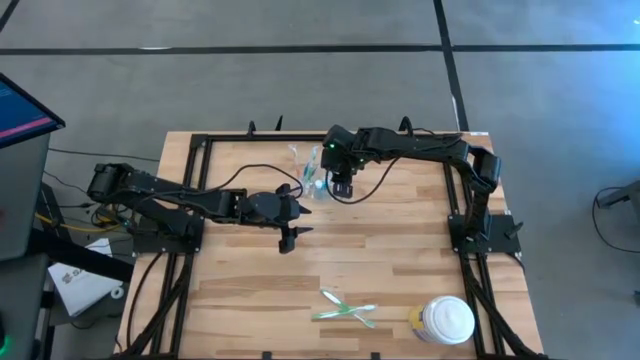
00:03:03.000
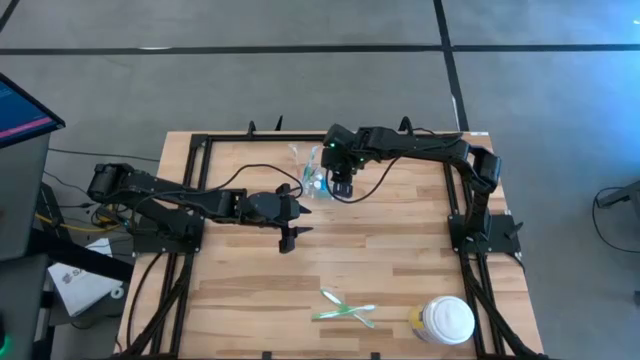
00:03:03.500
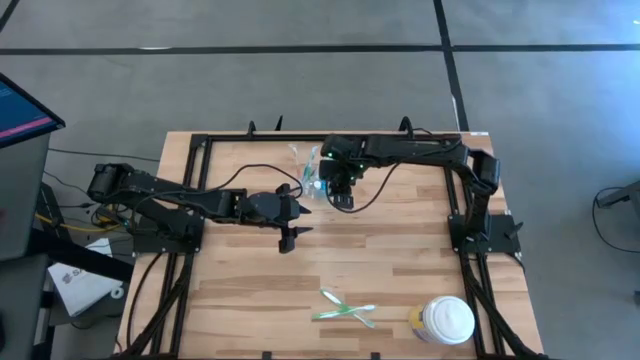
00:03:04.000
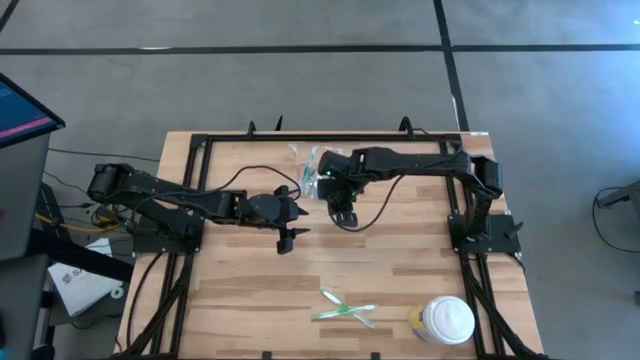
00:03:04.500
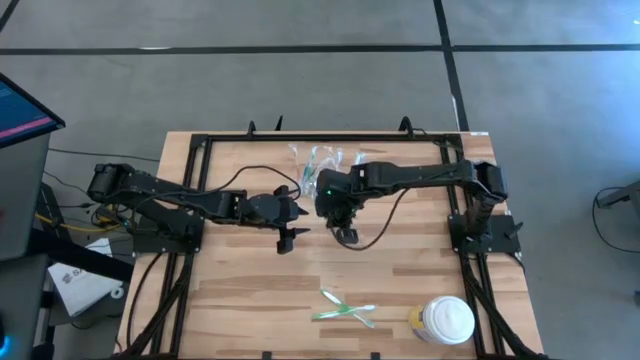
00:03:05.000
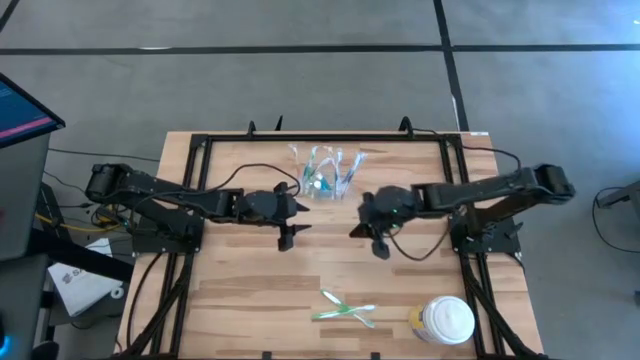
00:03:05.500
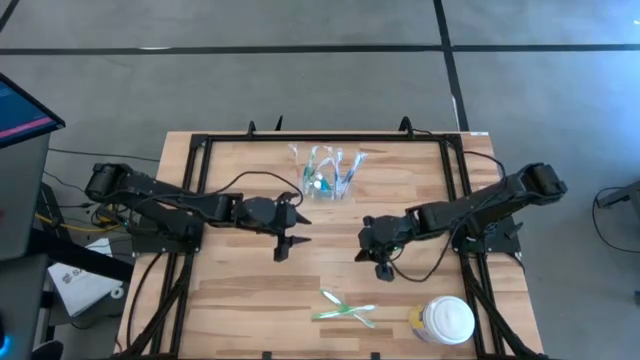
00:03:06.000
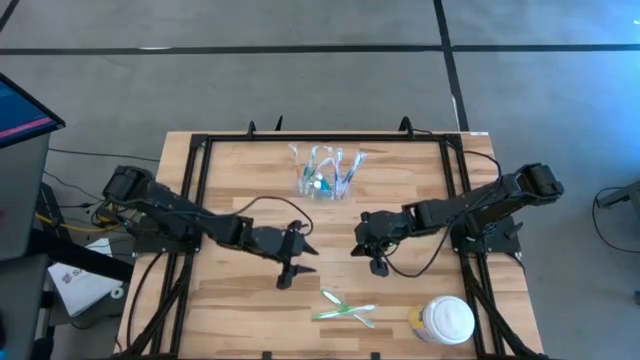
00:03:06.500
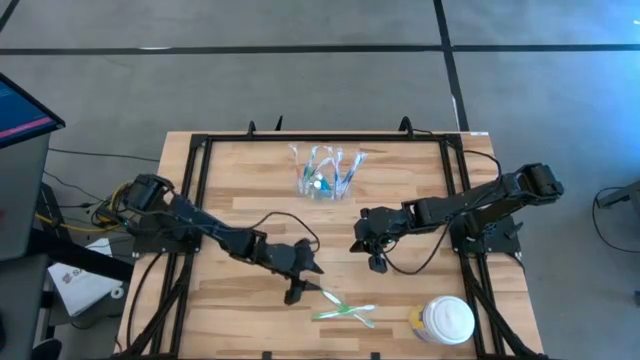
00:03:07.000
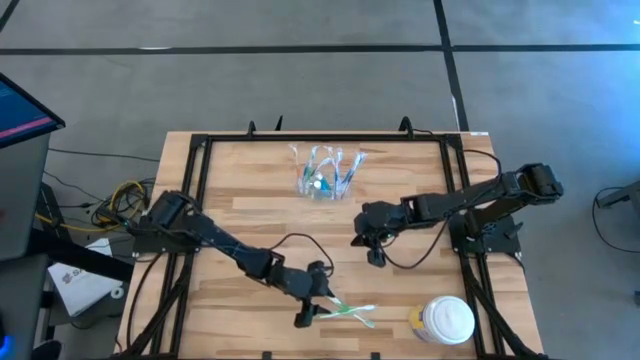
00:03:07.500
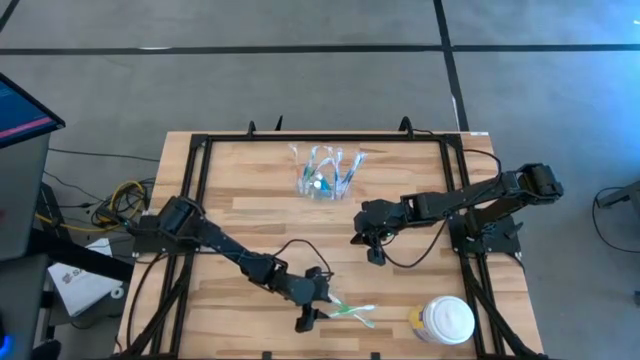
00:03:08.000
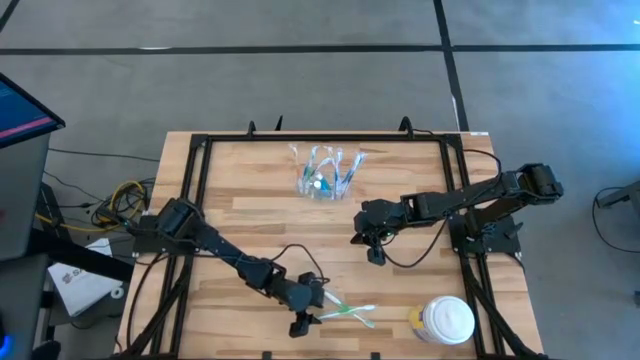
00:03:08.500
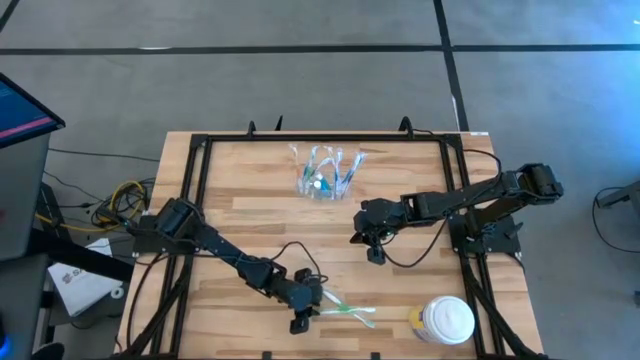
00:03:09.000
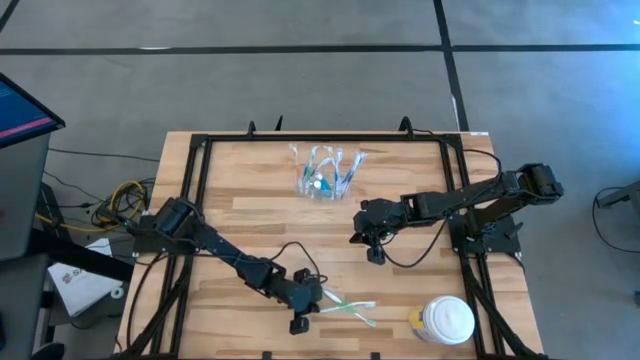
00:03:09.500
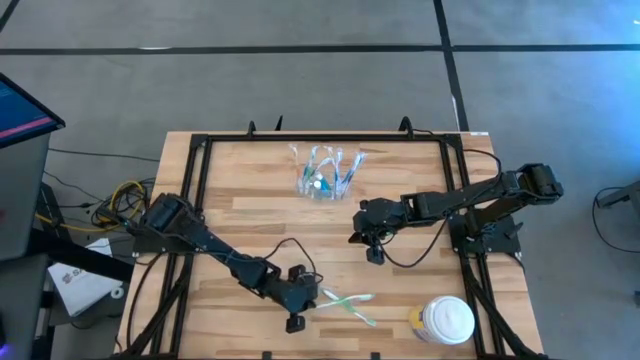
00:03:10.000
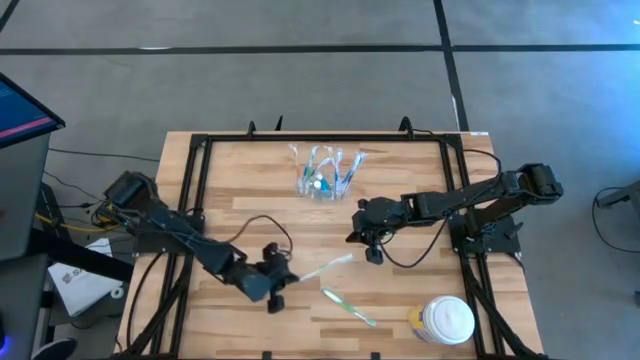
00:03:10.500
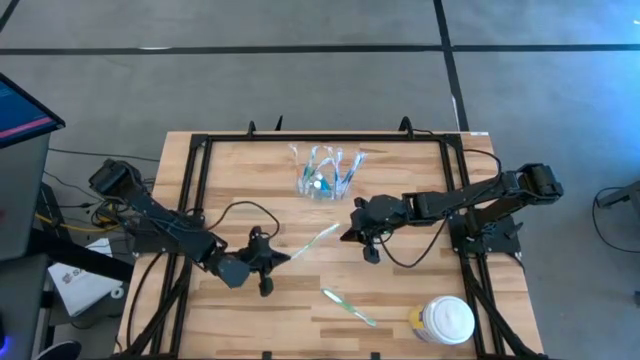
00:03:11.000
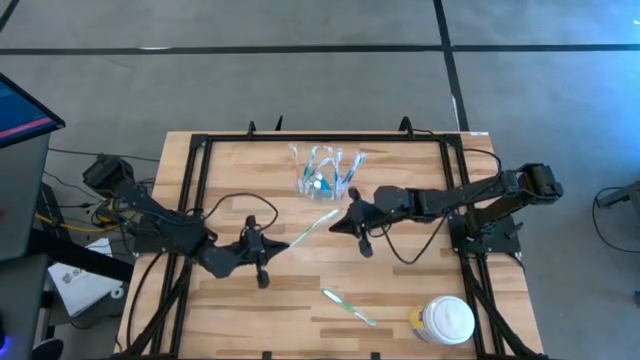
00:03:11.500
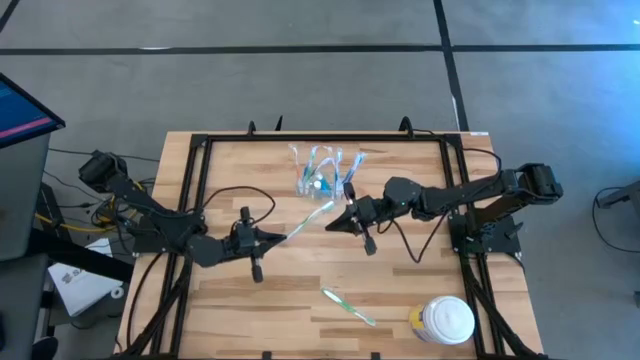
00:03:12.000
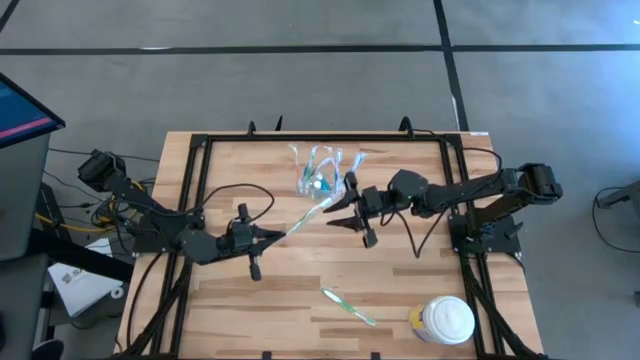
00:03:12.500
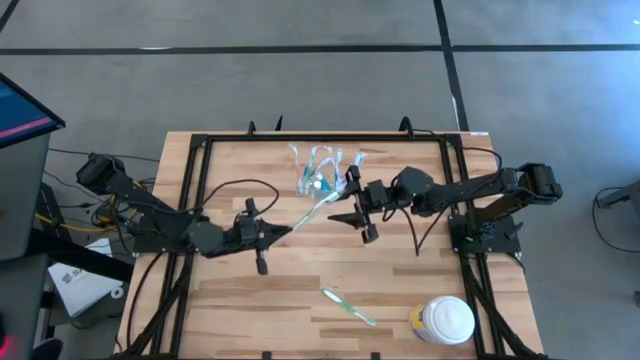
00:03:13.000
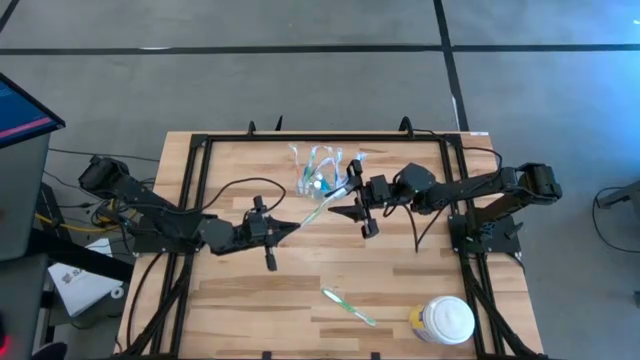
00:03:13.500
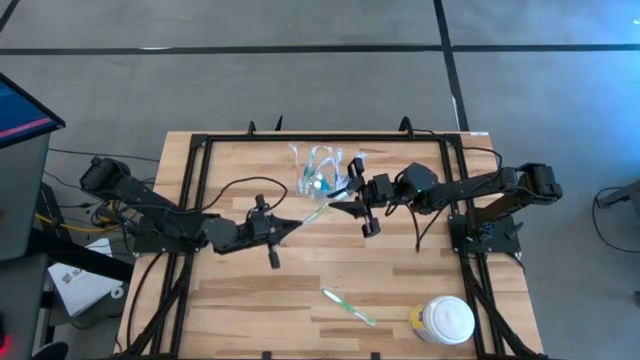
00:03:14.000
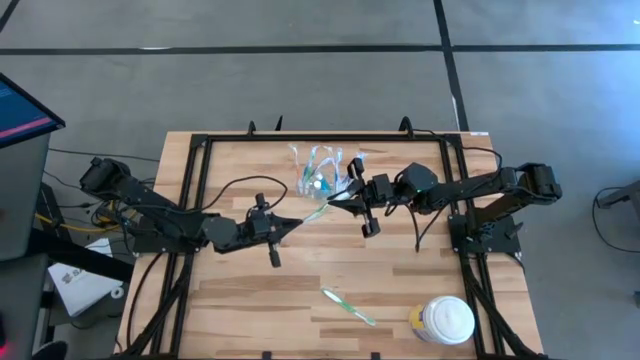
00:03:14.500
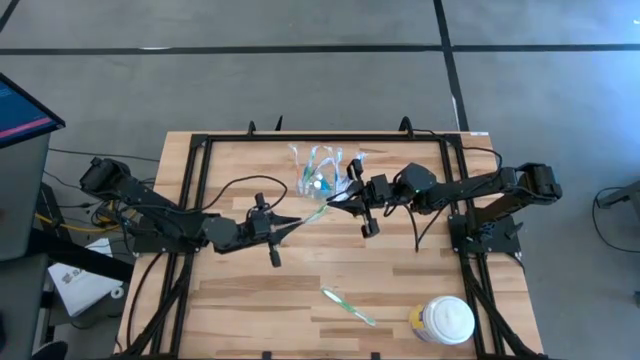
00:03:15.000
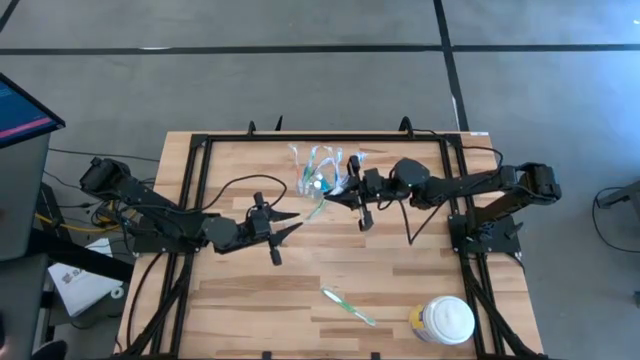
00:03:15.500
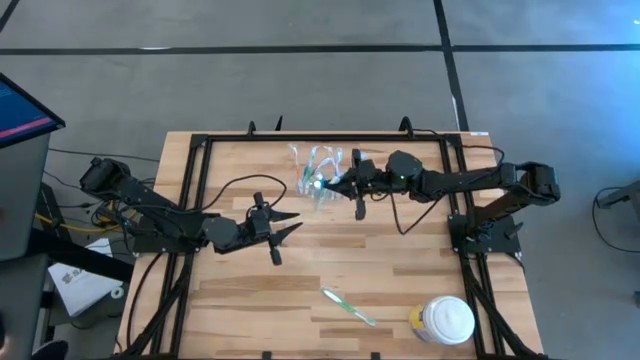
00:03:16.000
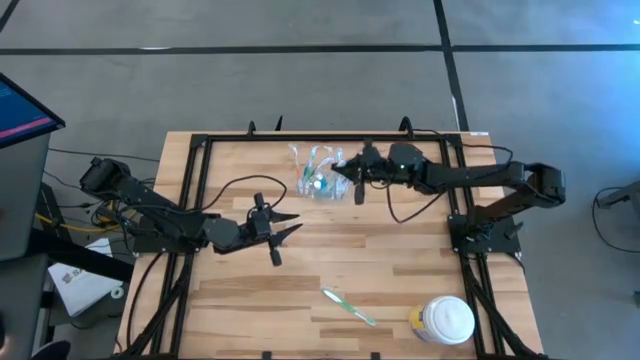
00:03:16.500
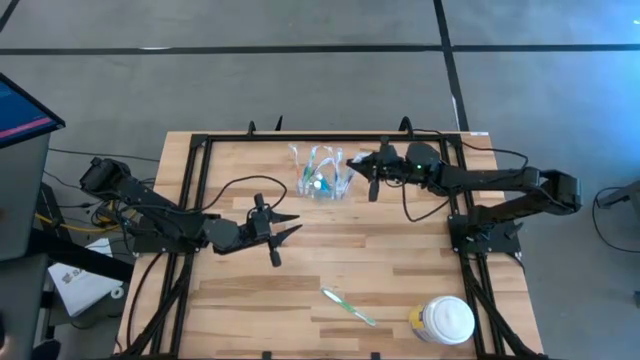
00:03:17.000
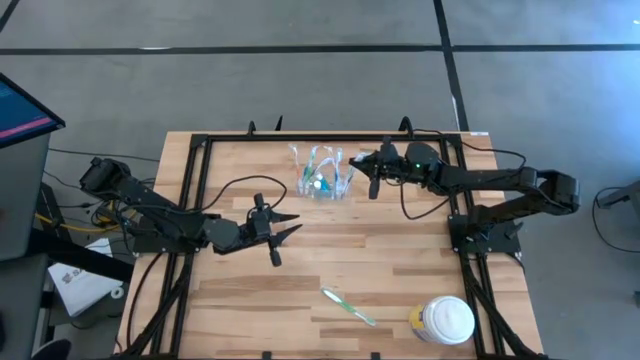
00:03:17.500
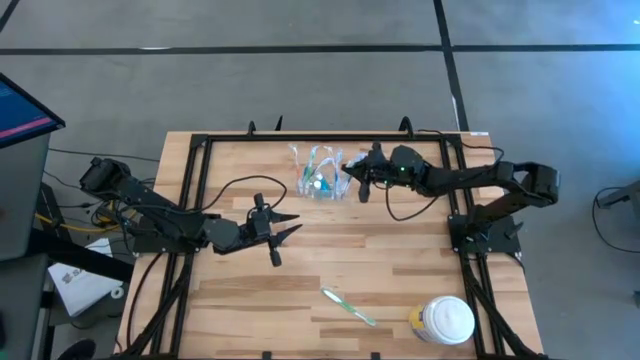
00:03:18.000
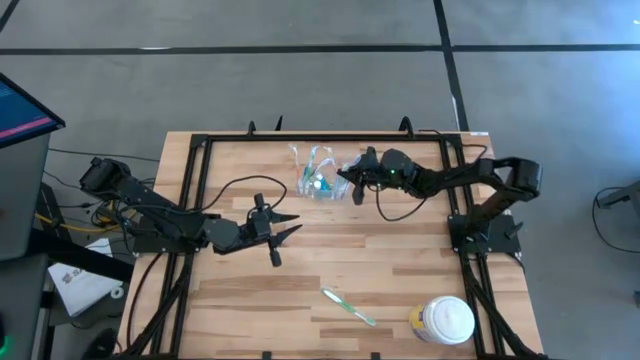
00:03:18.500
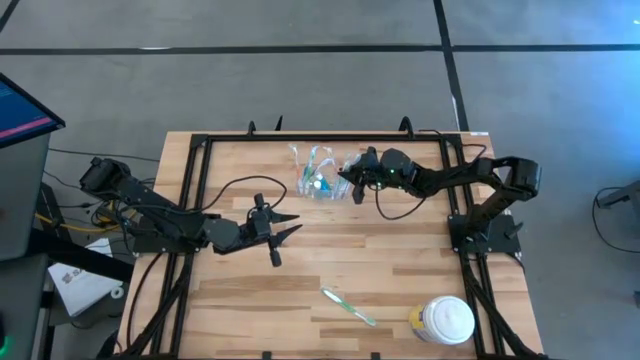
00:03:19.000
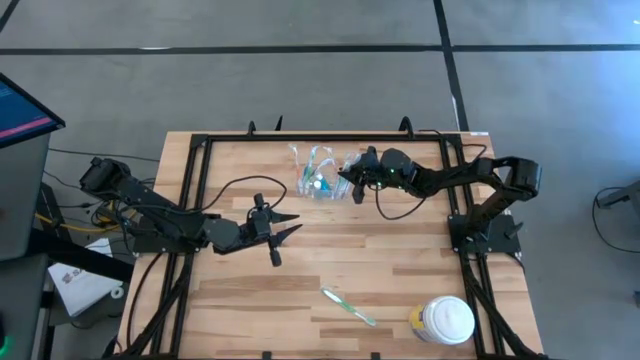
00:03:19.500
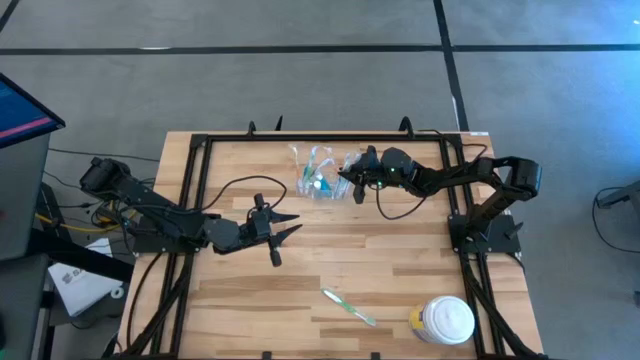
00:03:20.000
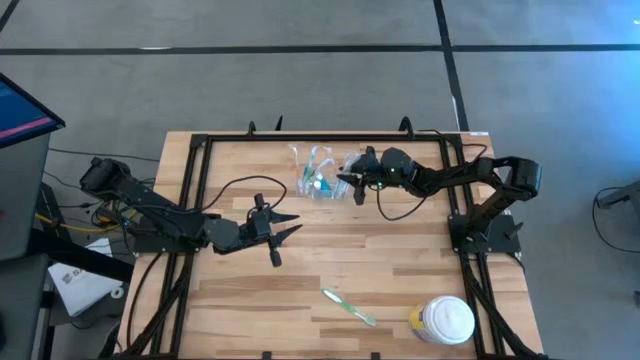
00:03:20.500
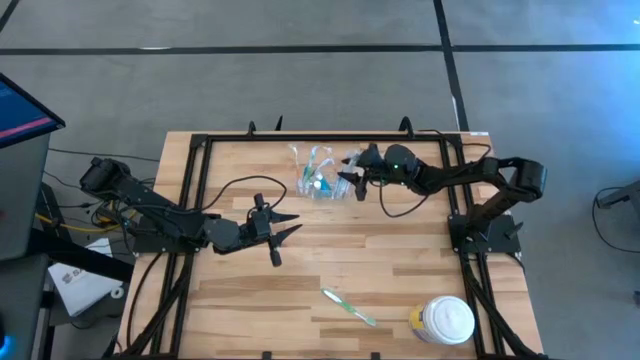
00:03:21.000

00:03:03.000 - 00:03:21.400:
Task: Pick & Place toothbrushing station
Put the bottom green toothbrush into the transparent organizer
